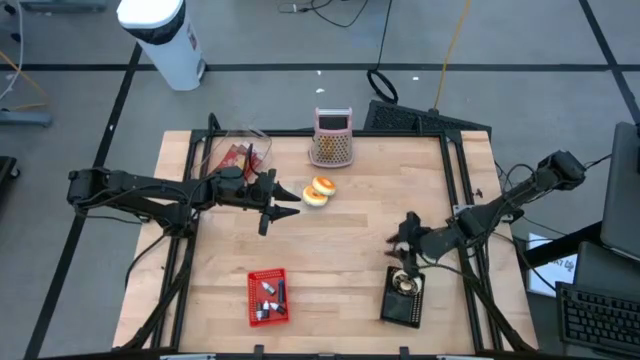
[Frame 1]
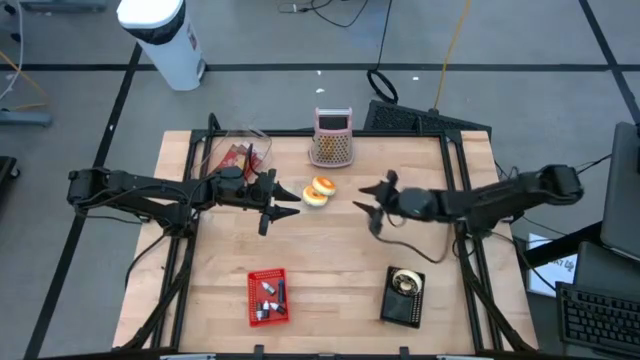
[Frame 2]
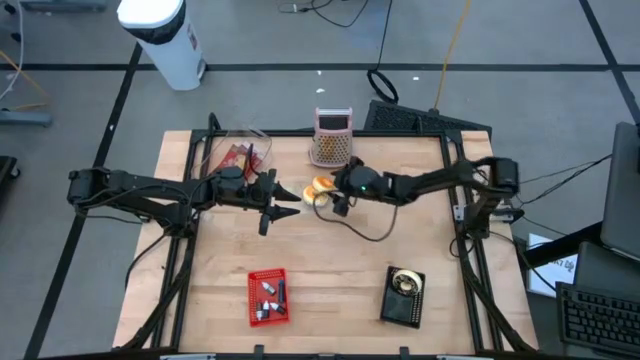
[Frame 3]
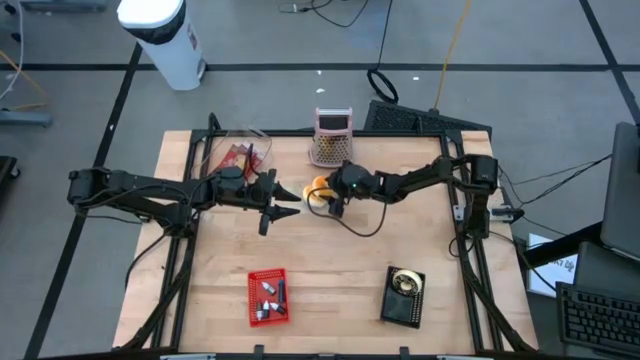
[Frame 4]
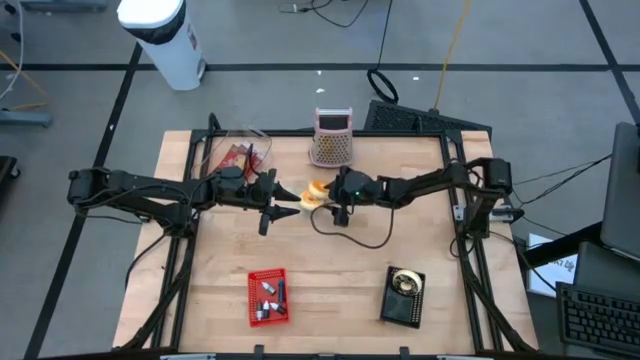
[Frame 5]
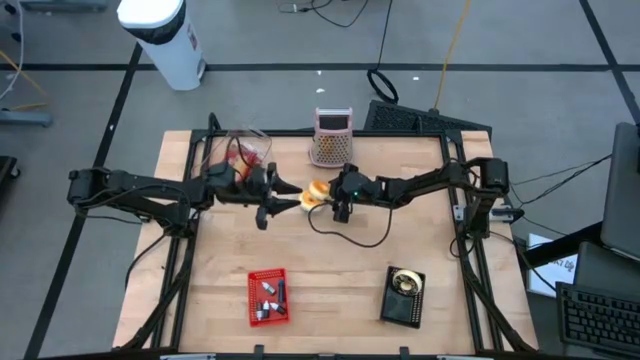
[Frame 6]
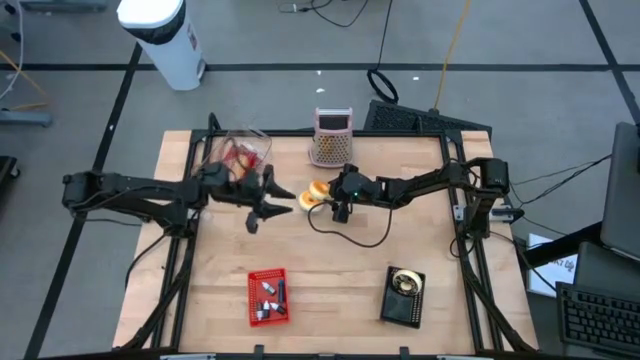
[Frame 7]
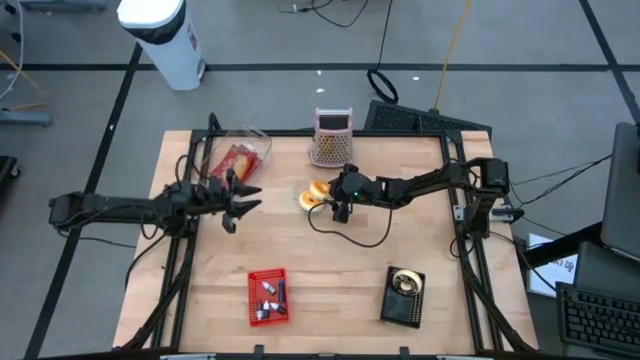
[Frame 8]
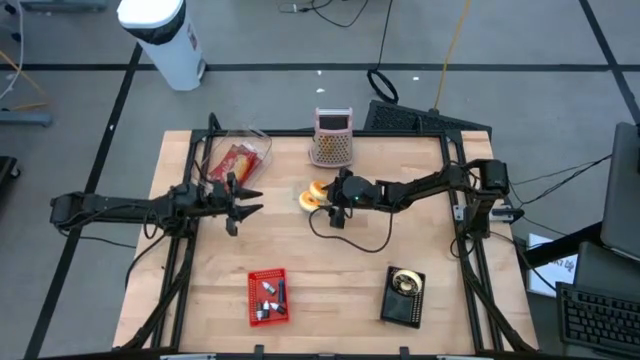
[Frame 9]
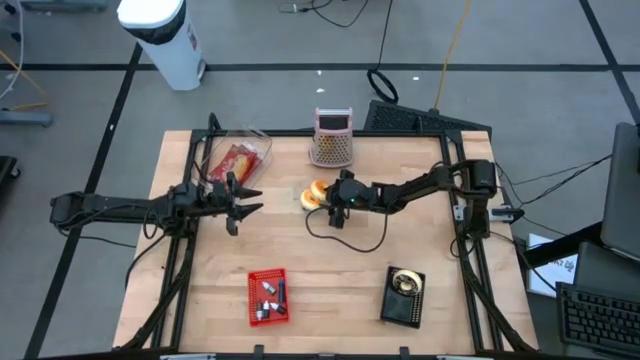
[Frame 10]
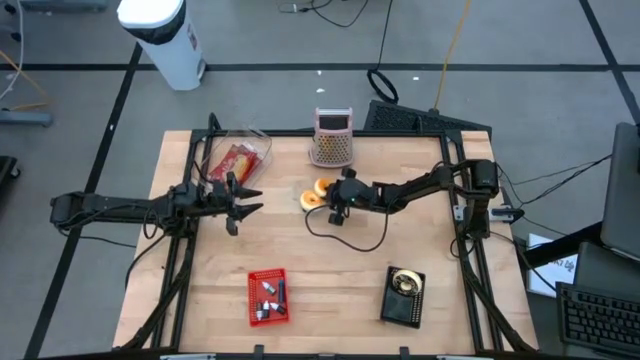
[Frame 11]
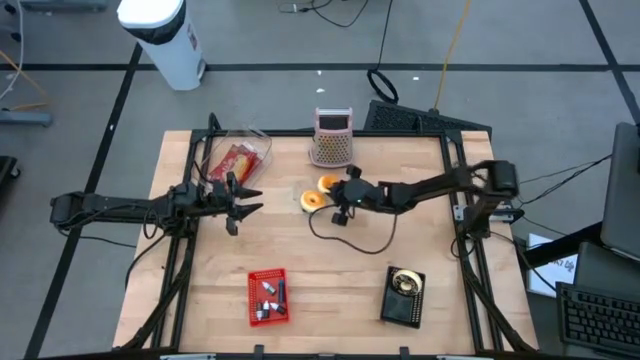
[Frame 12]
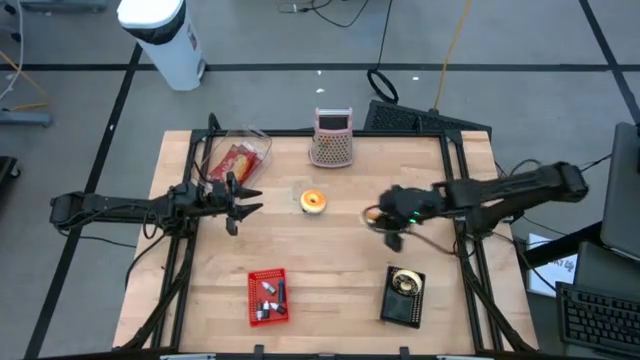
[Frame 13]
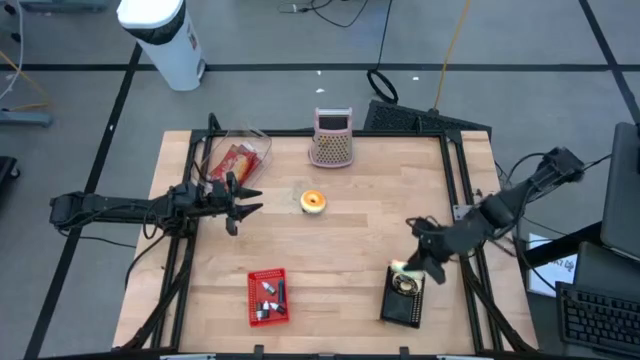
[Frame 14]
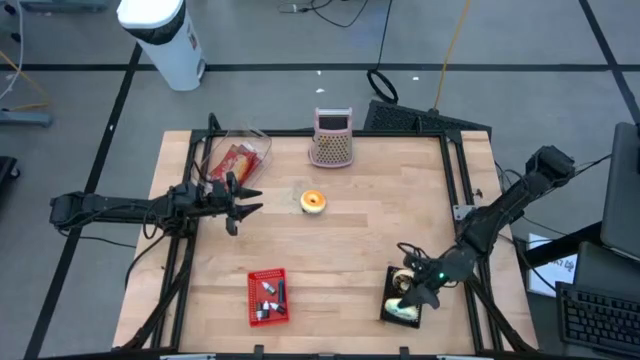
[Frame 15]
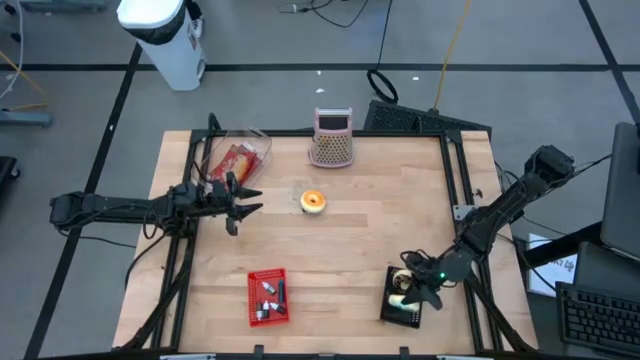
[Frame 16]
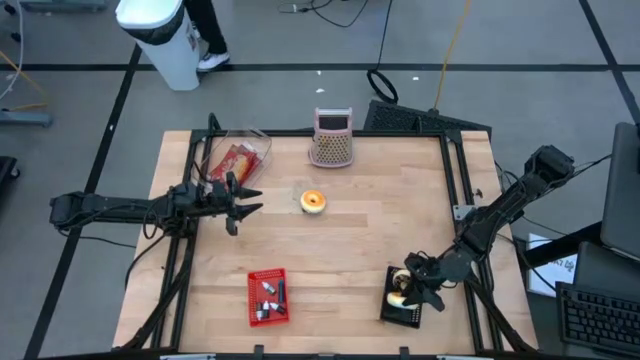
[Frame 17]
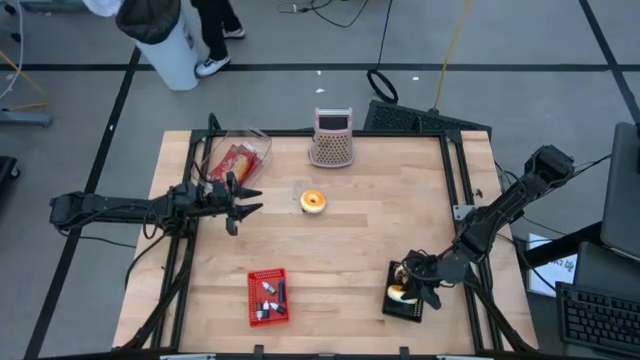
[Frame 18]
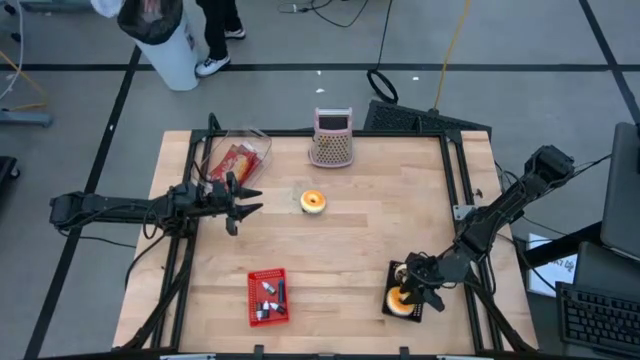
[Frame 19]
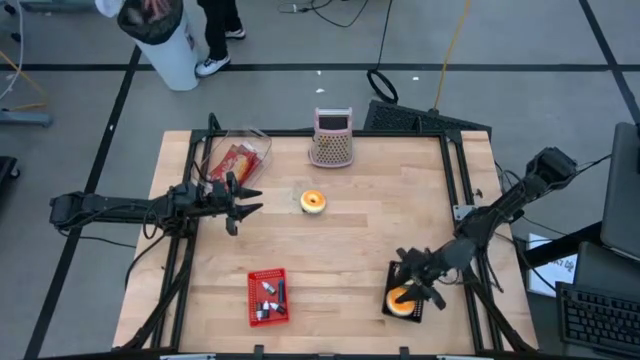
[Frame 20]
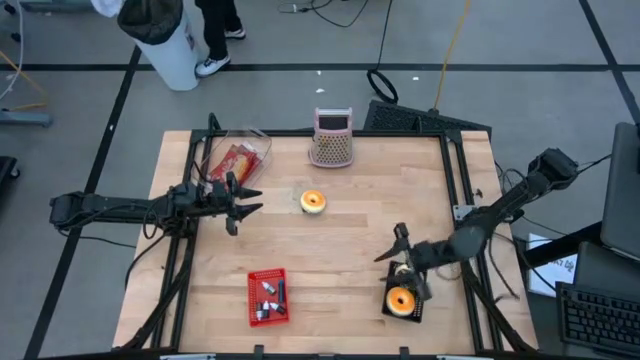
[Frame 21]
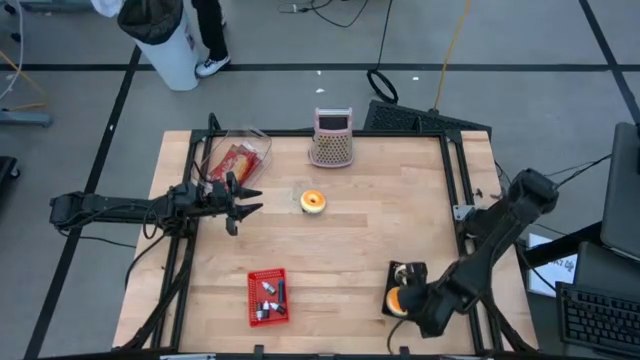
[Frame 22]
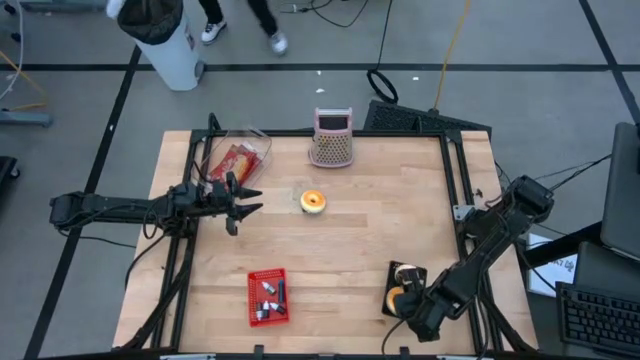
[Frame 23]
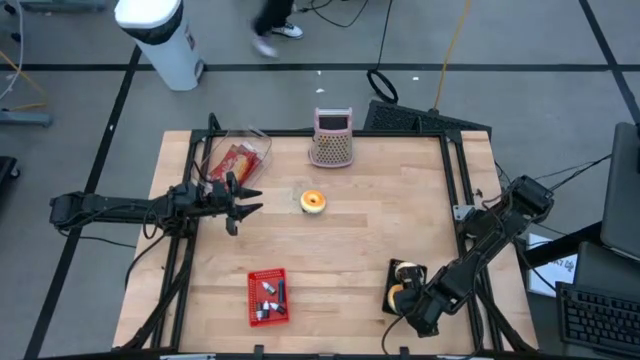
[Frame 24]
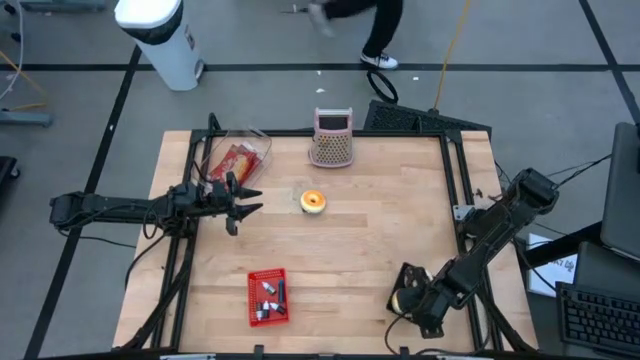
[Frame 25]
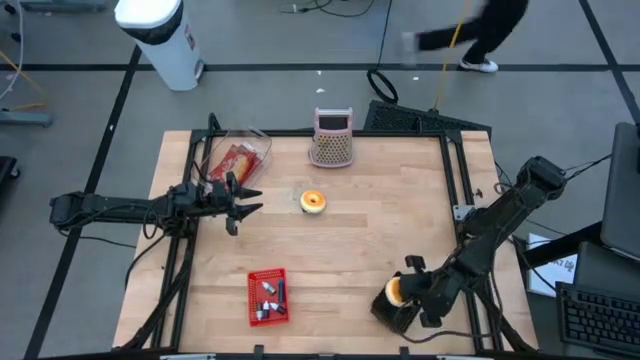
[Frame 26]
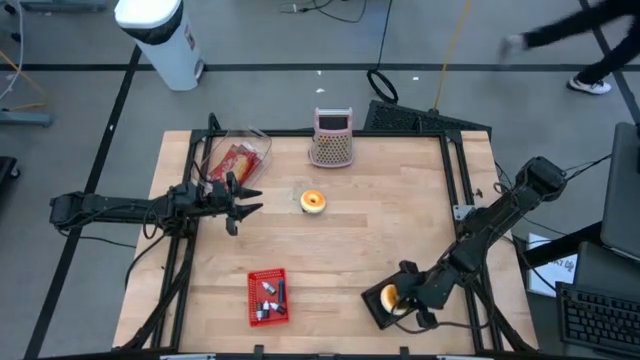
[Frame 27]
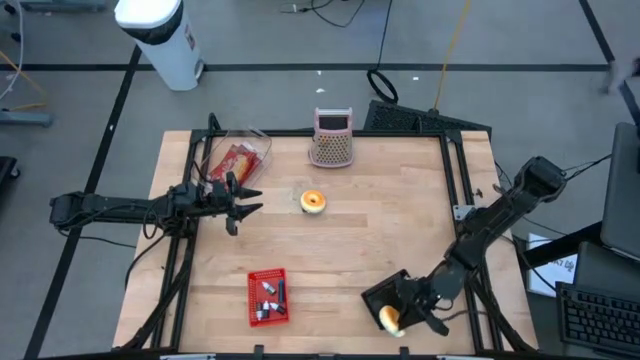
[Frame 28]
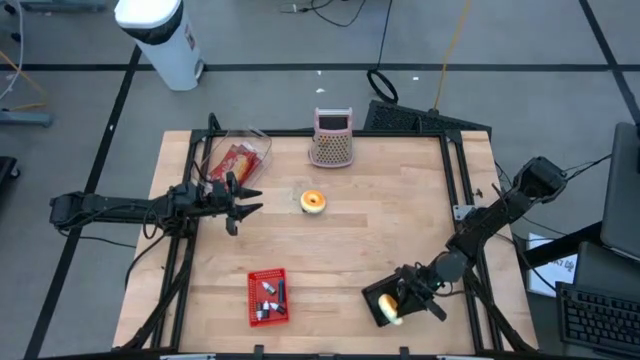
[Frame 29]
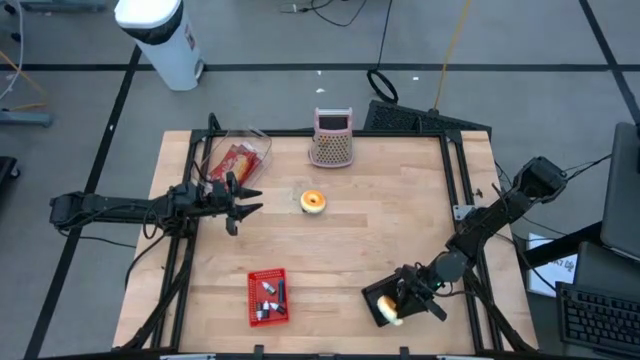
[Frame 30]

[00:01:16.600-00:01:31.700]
Put the light blue doughnut into the black bin

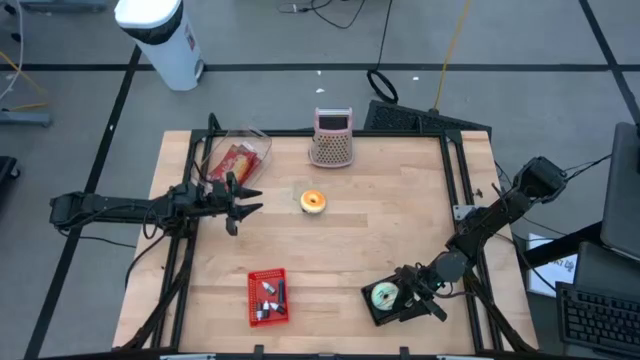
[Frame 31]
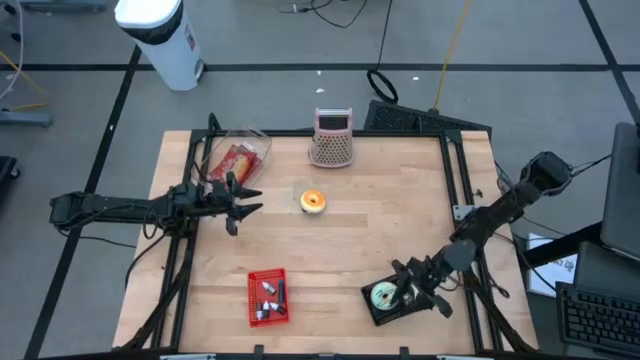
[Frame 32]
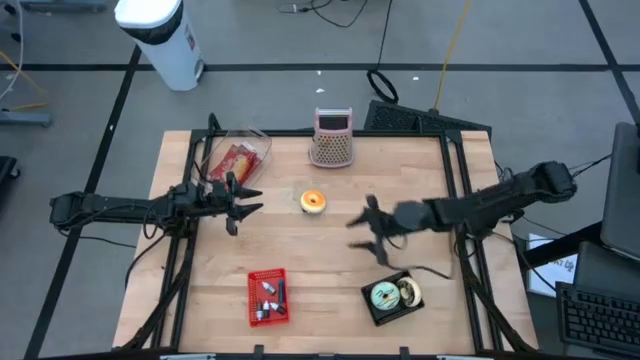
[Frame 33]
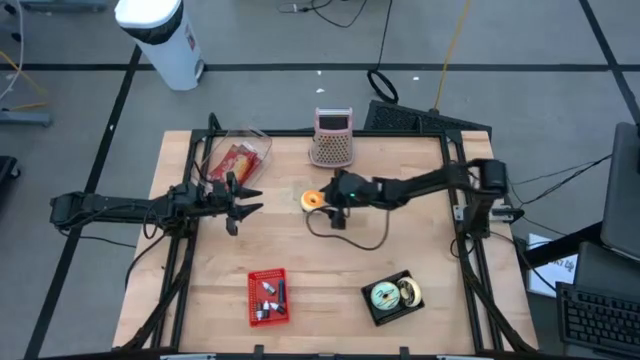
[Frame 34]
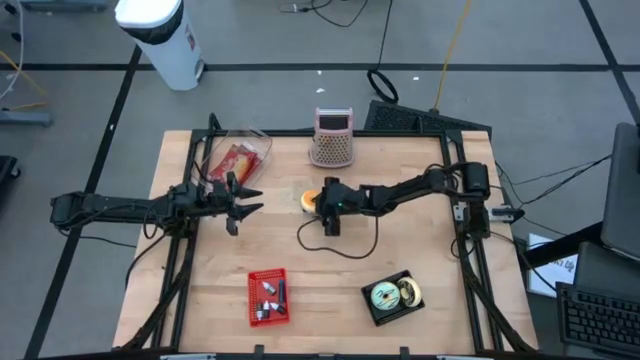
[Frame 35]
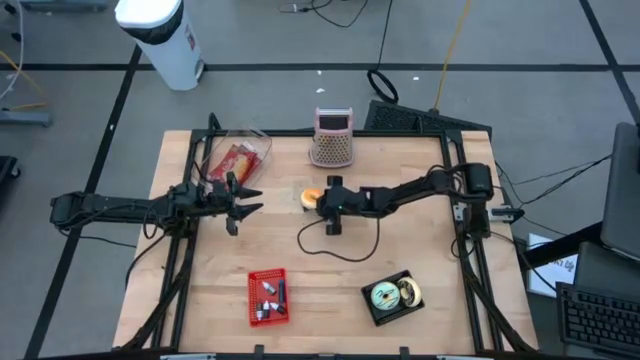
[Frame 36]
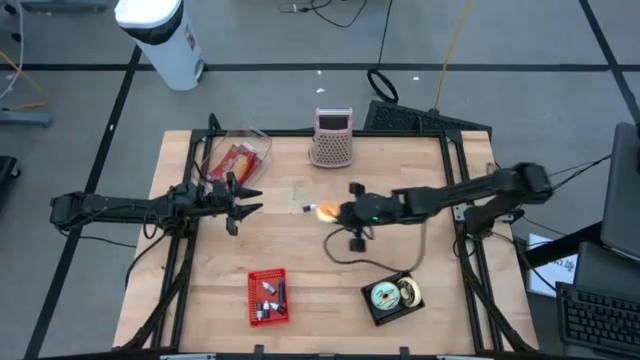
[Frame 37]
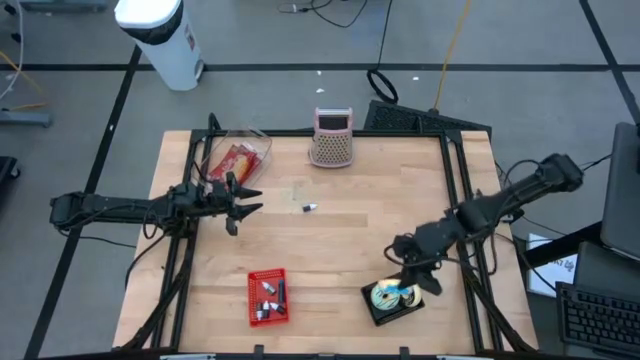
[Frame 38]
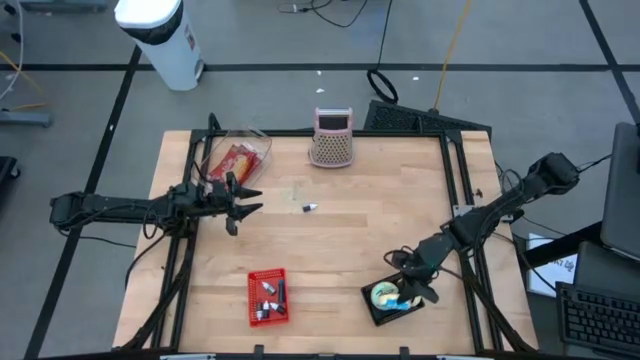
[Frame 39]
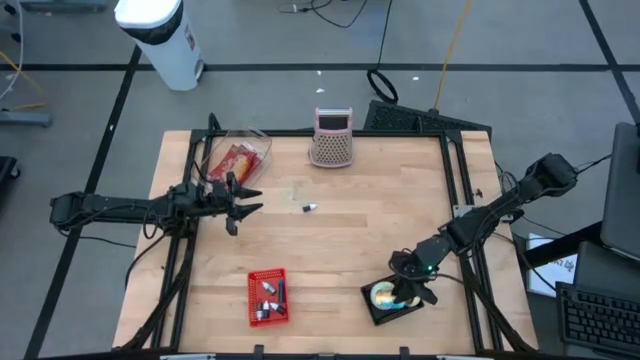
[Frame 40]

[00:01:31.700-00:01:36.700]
Put the blue doughnut into the black bin
